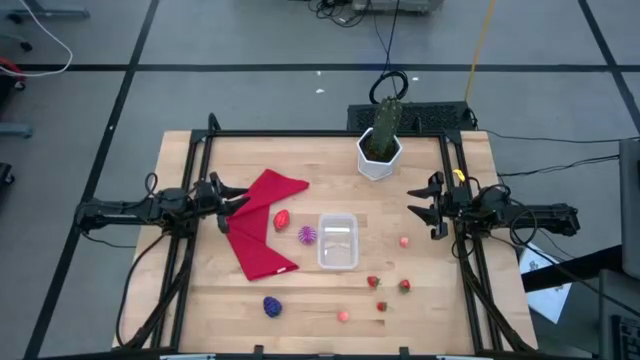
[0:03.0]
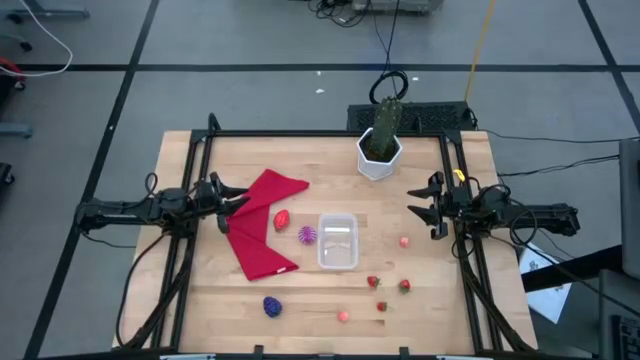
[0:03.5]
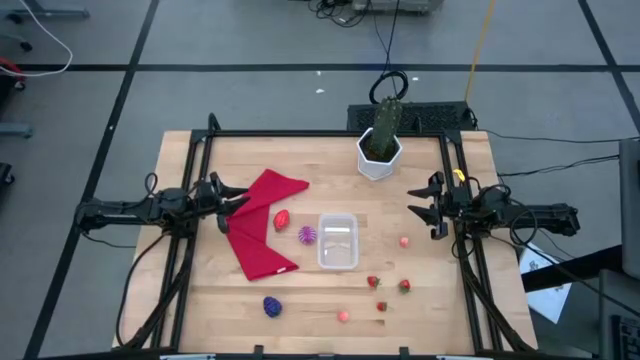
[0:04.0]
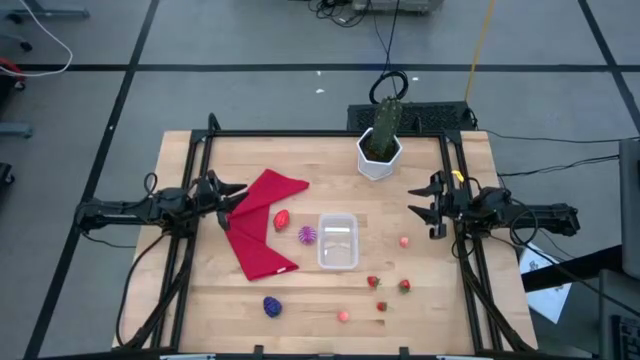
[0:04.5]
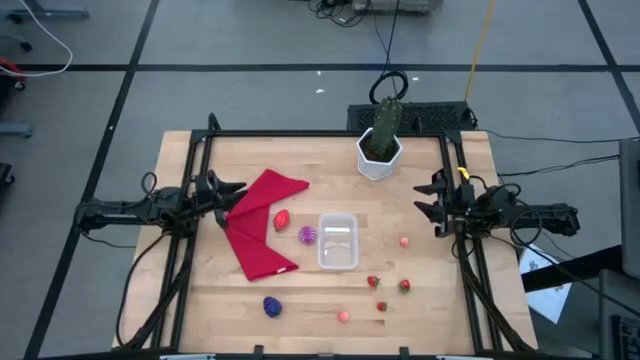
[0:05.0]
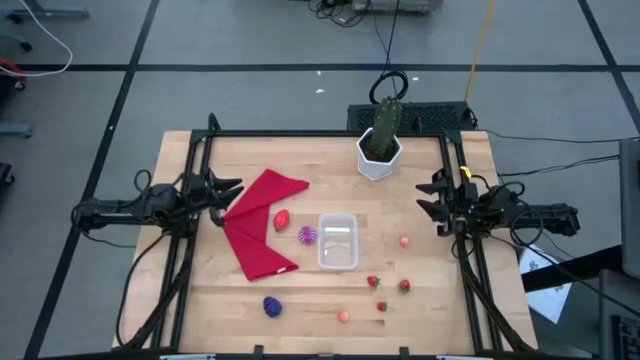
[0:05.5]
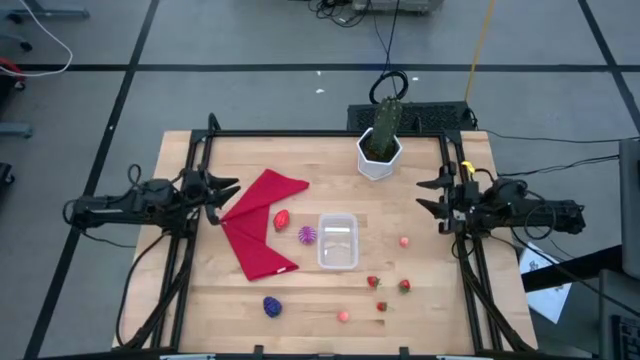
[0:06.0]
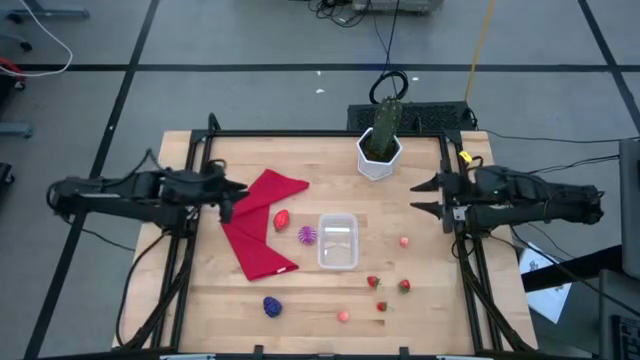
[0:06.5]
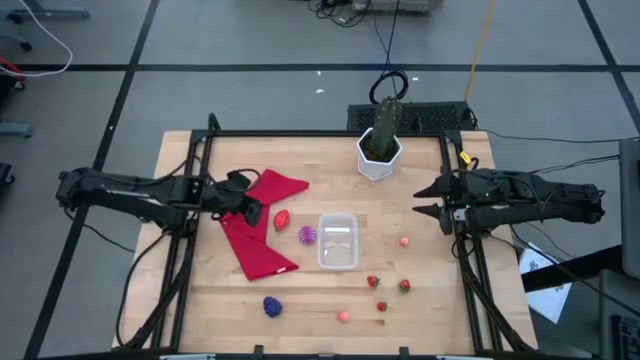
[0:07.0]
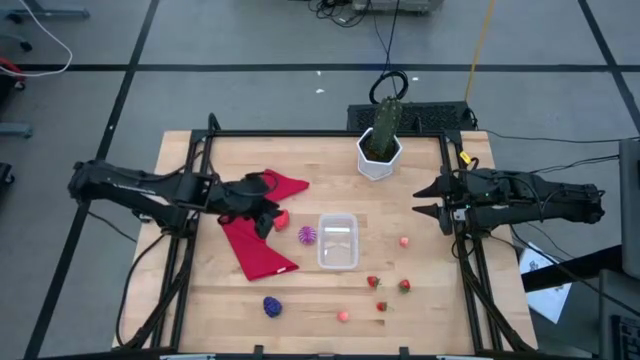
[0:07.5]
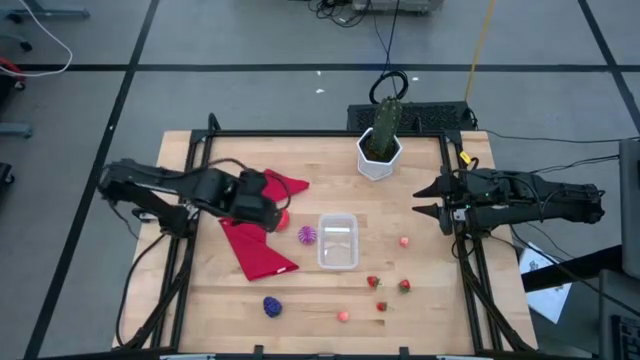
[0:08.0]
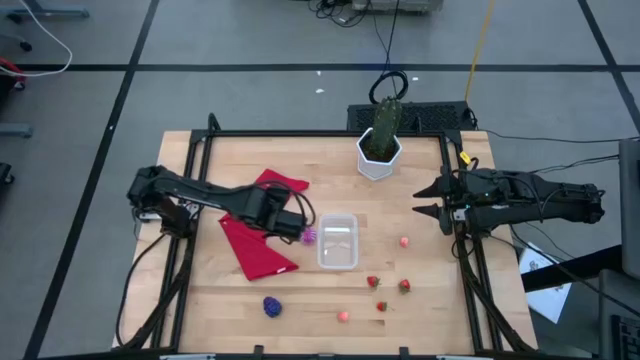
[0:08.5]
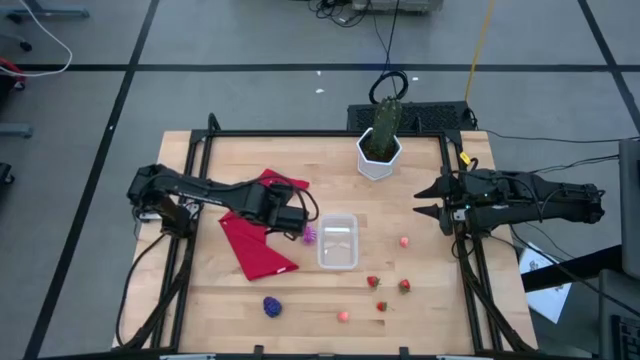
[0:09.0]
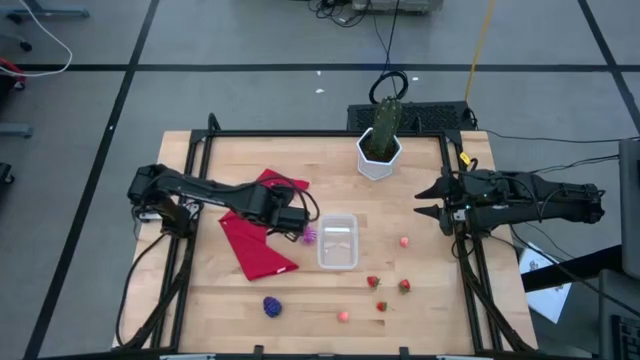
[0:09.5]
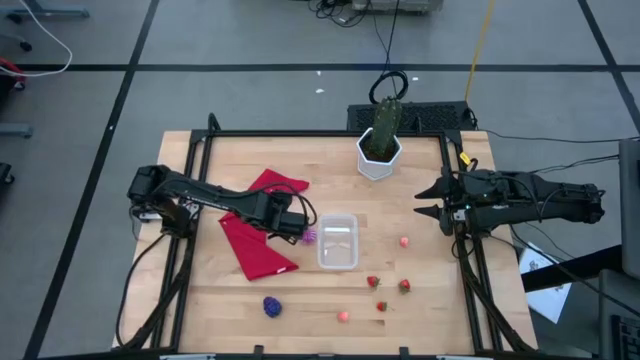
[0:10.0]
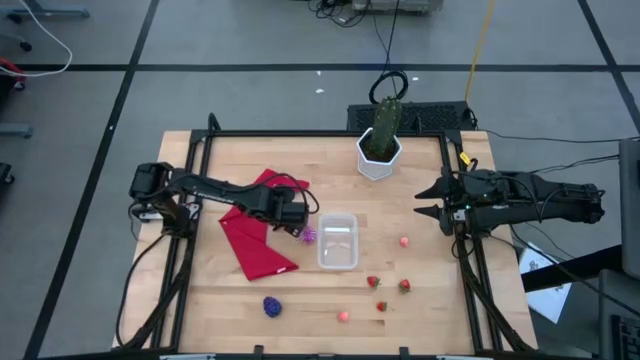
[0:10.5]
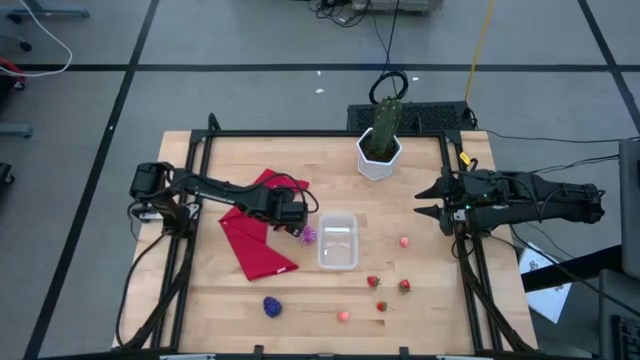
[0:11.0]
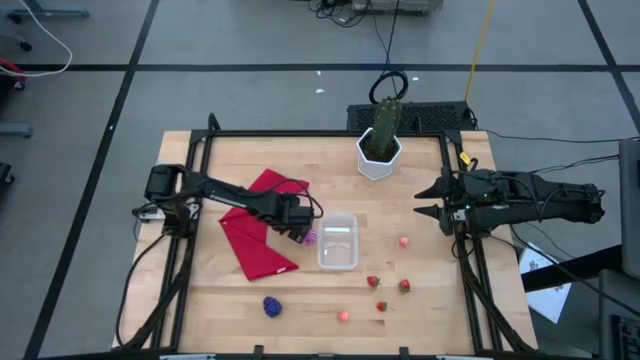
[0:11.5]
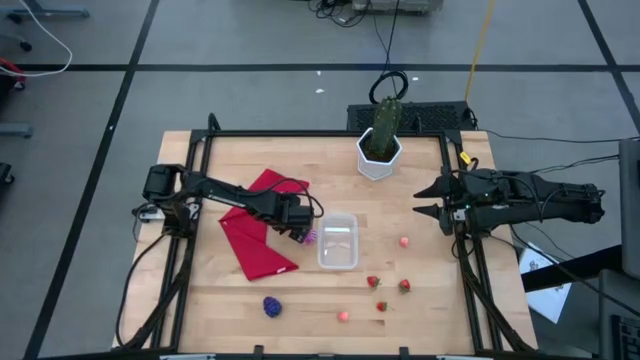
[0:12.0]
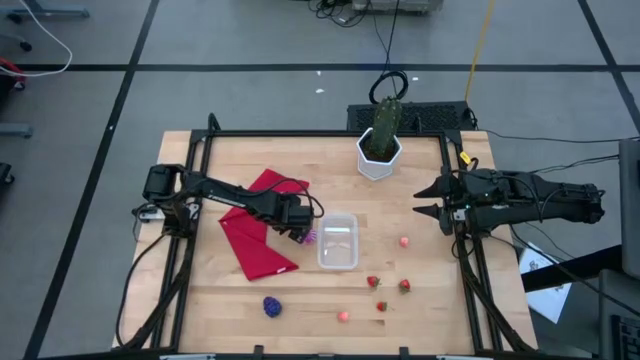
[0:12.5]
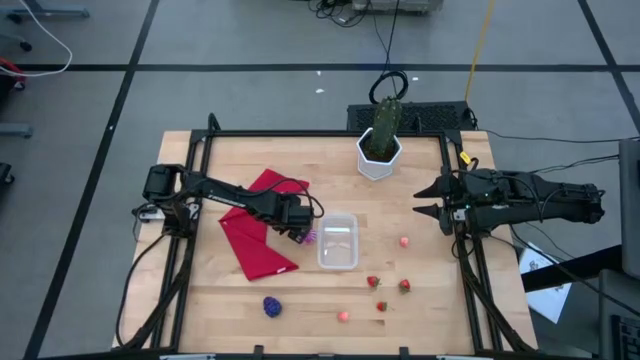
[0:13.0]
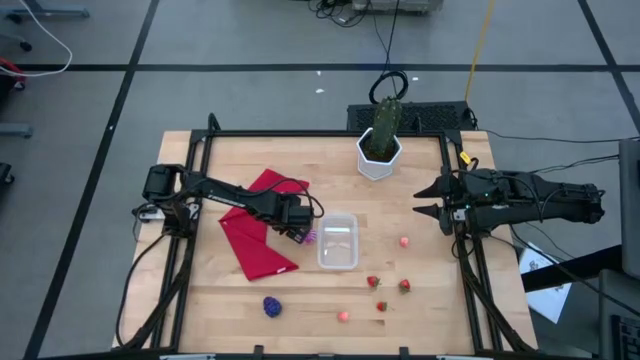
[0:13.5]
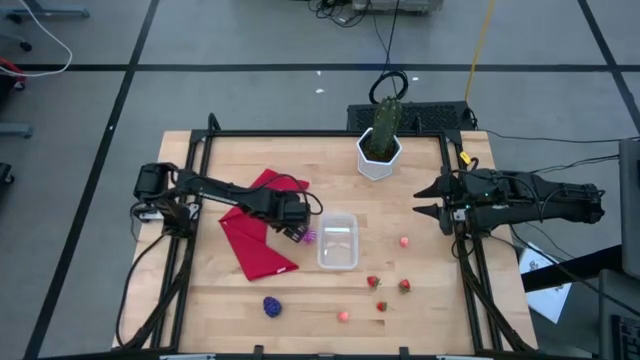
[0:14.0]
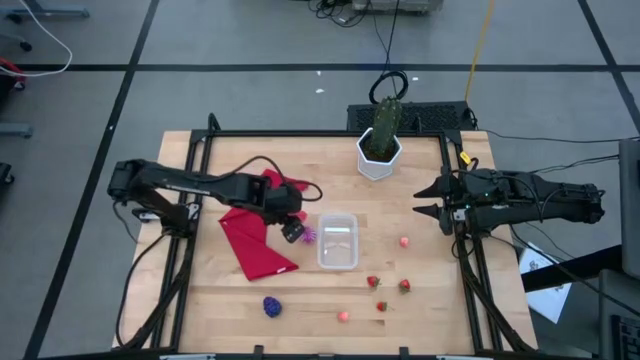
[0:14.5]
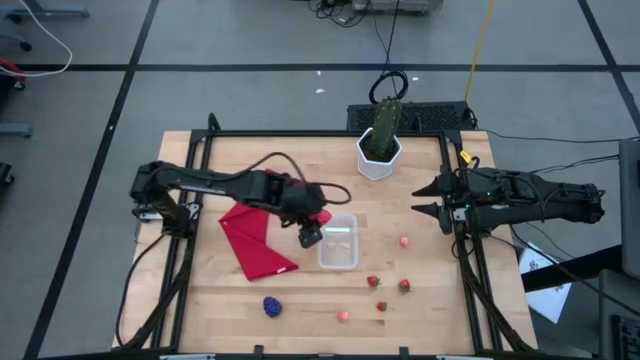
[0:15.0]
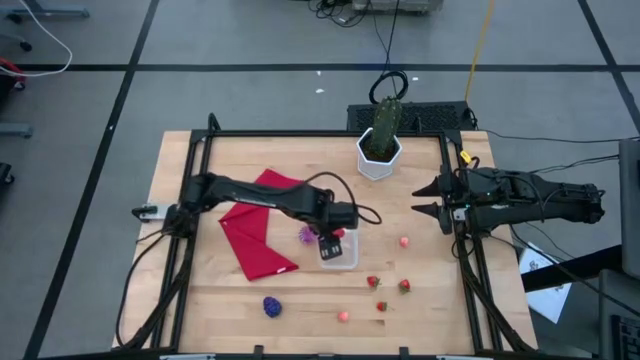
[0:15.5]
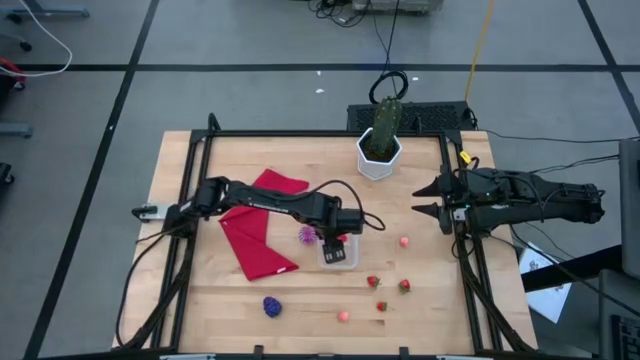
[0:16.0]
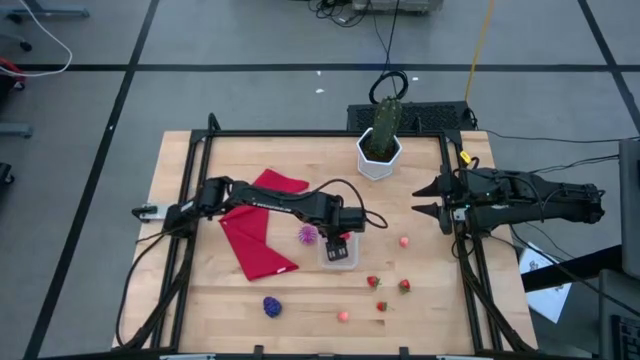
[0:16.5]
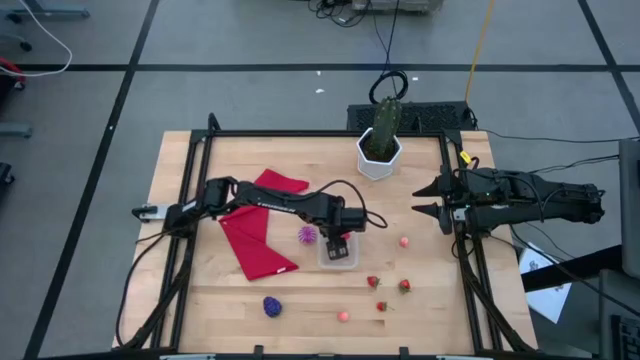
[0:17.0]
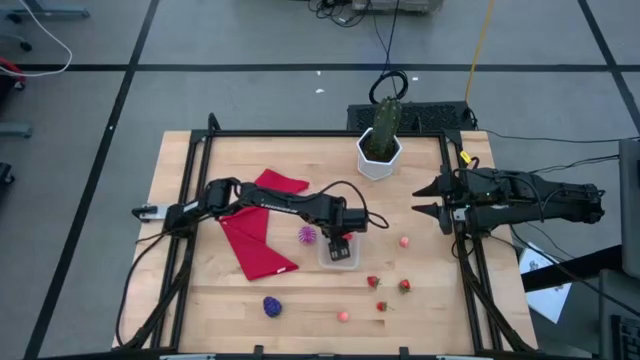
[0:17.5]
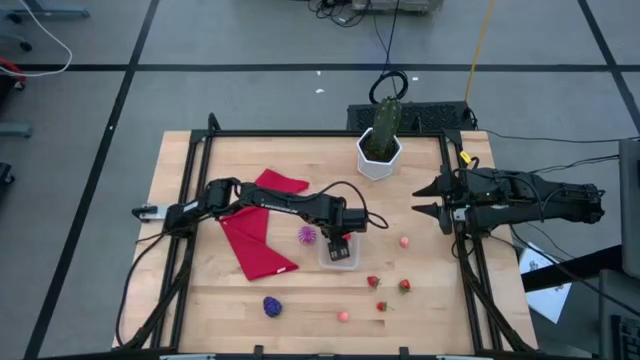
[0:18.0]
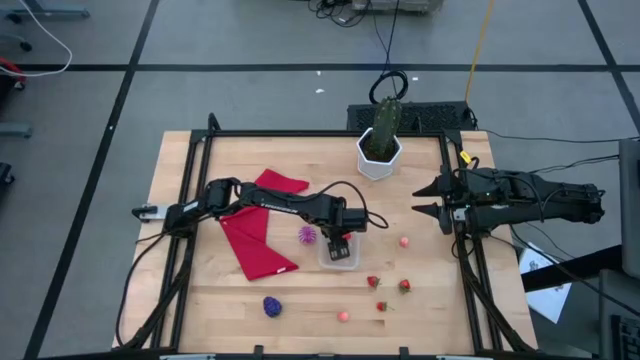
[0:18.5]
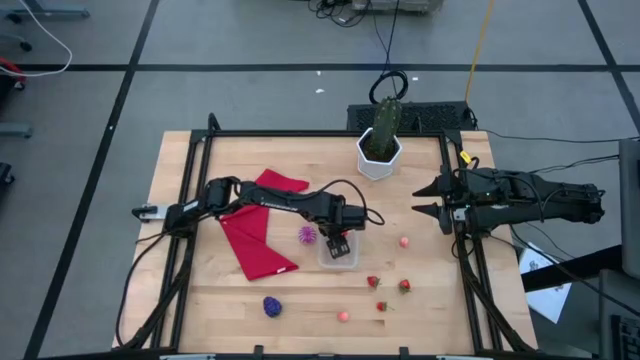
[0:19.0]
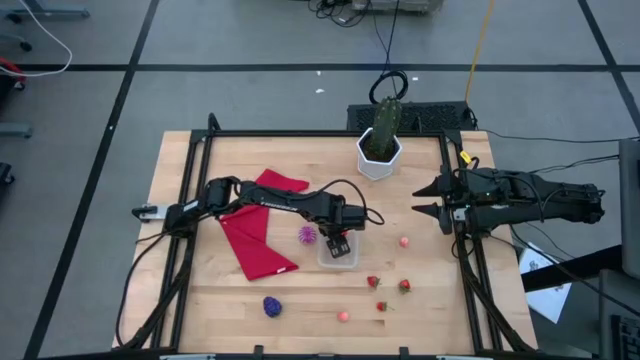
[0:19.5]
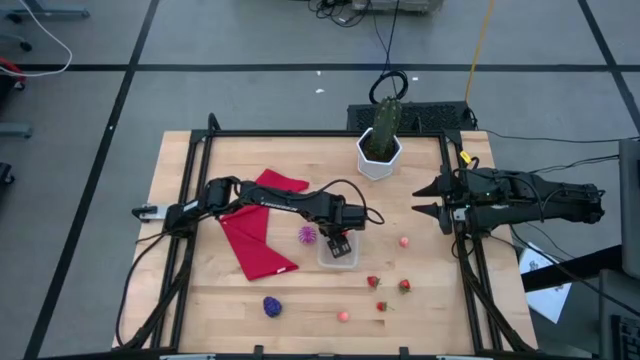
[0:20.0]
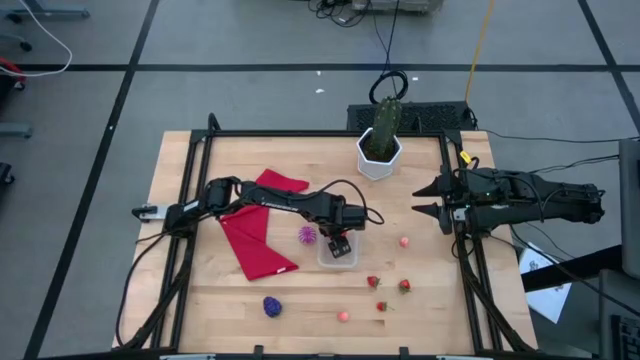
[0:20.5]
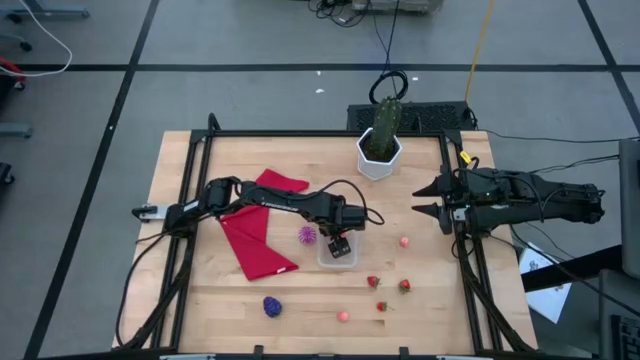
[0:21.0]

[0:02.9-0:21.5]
Task: Pick and placing Produce into tupperware
Put the red dragon fruit into the transparent bin
